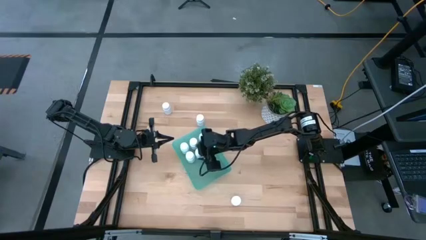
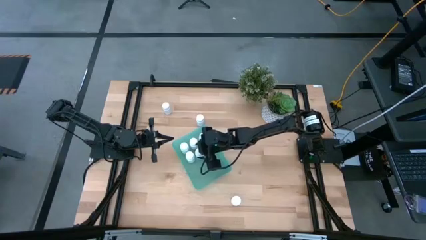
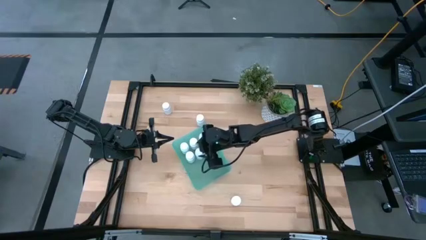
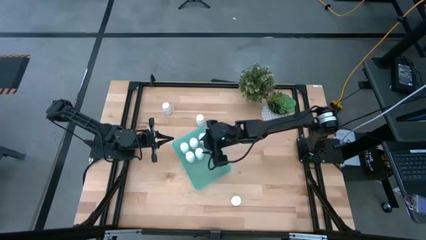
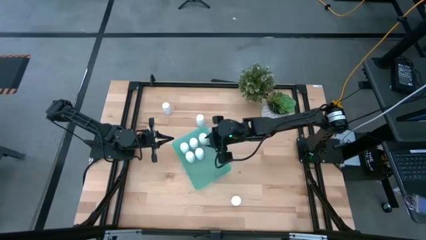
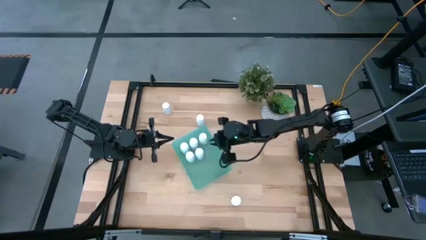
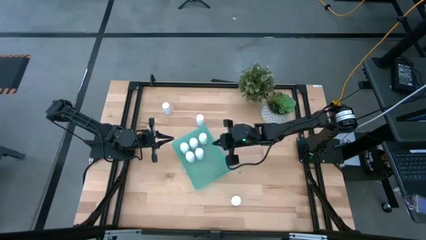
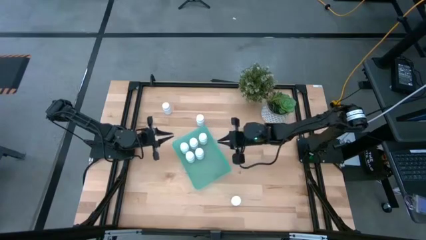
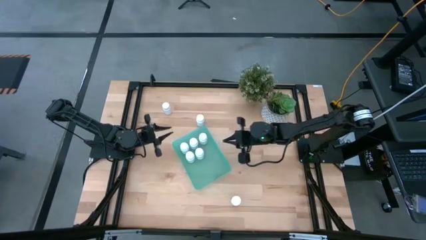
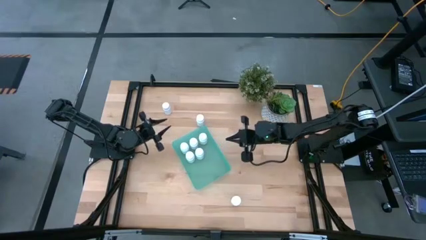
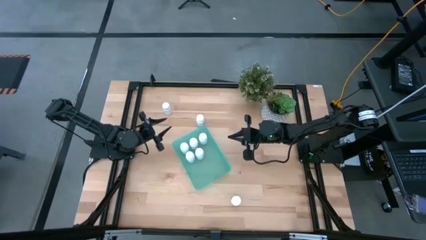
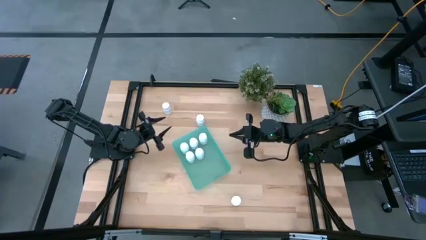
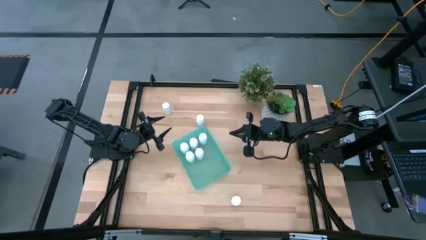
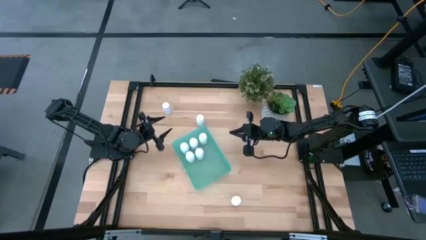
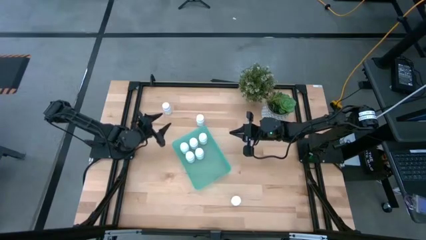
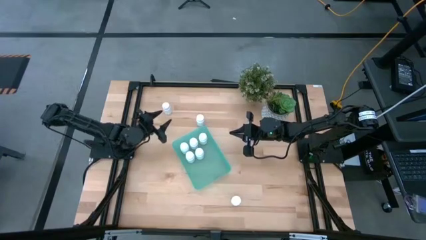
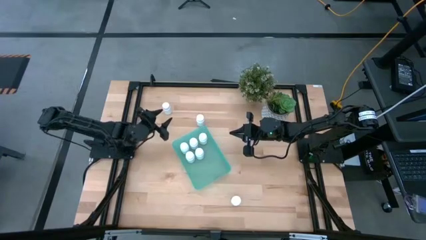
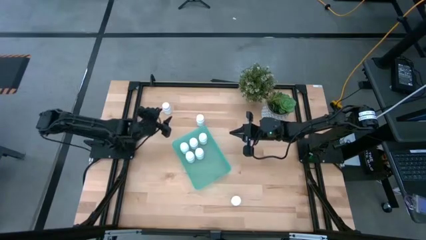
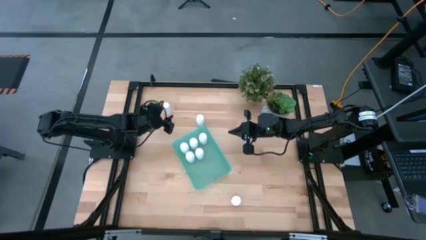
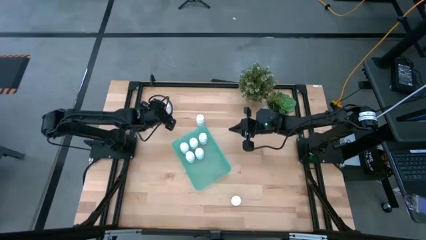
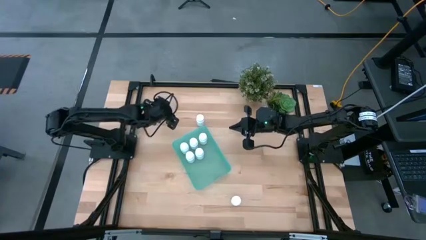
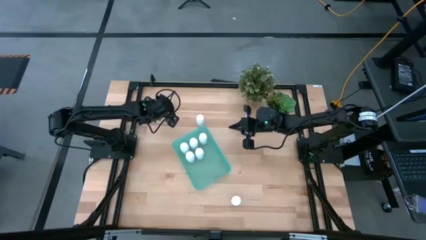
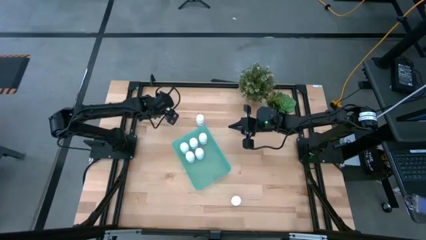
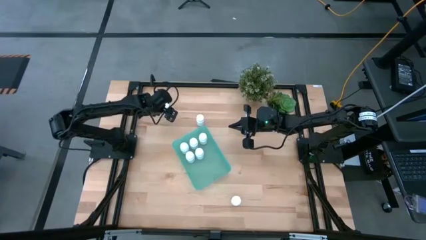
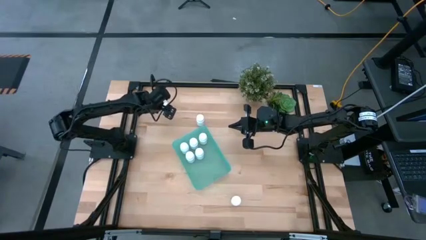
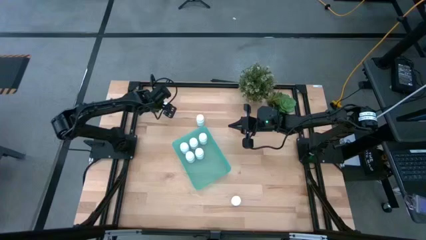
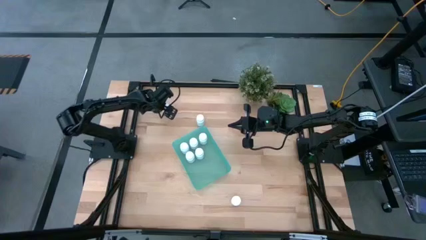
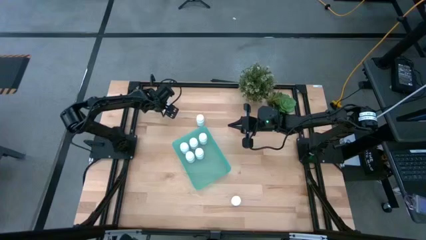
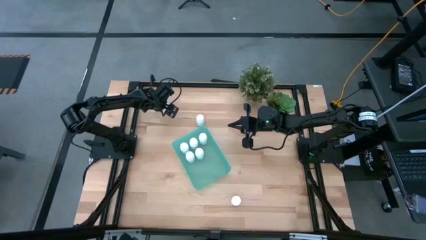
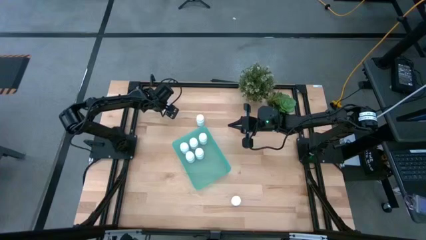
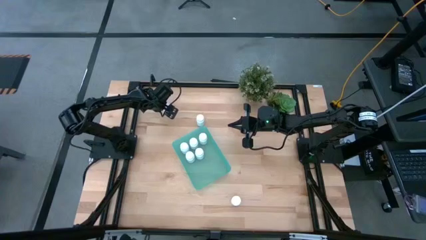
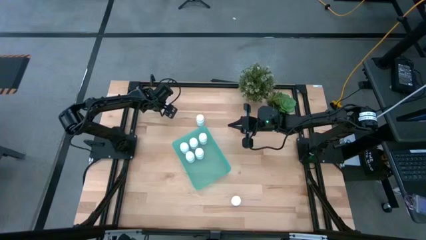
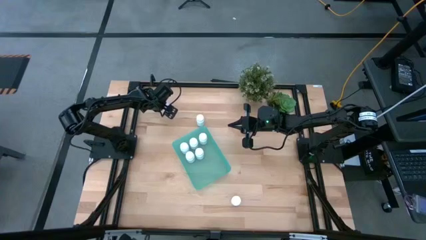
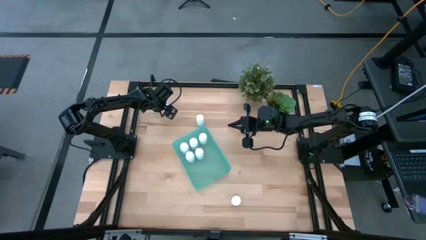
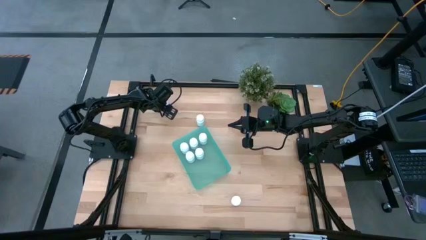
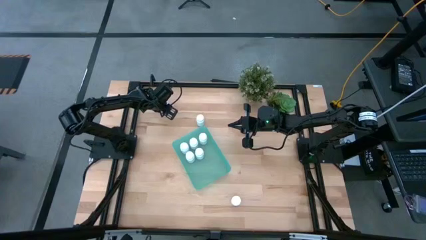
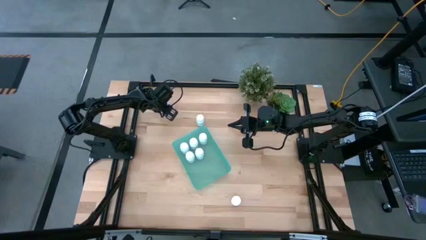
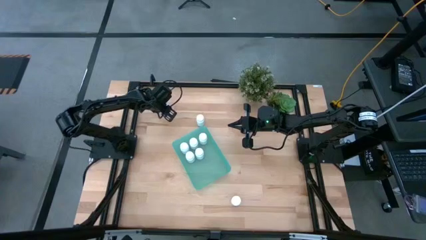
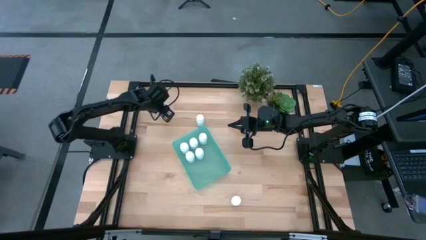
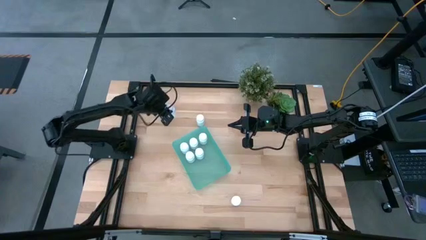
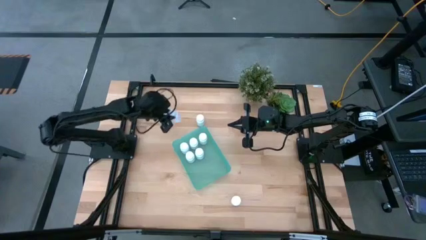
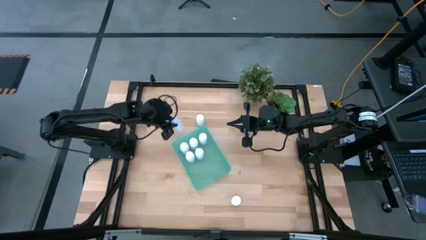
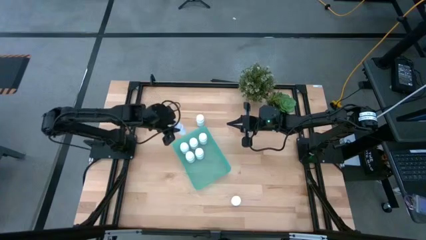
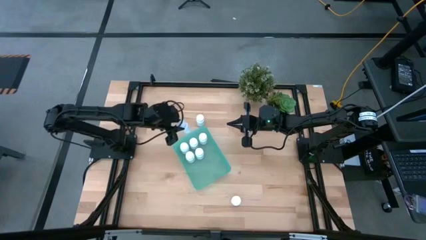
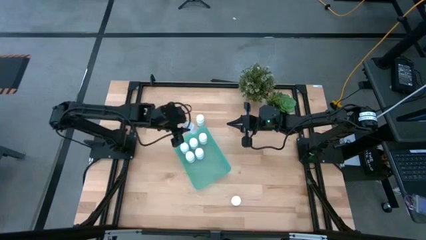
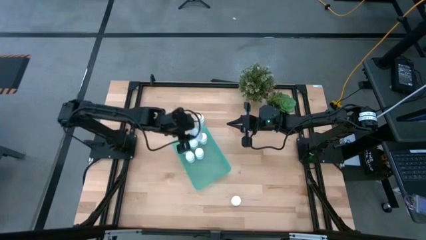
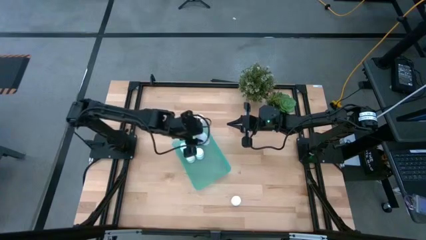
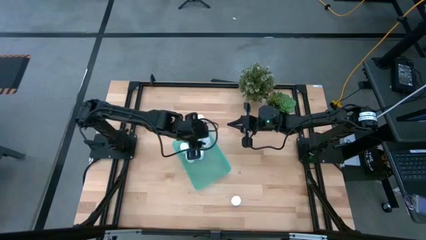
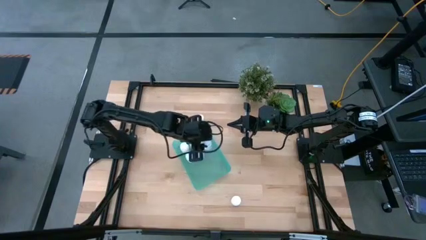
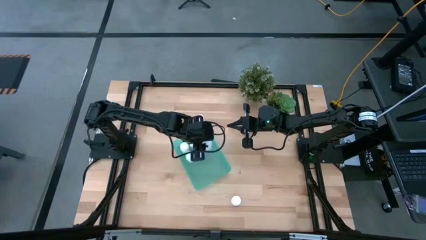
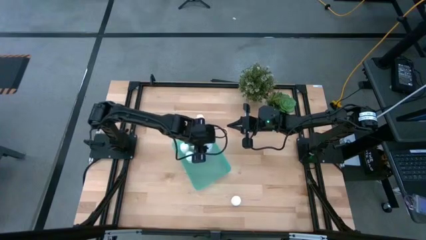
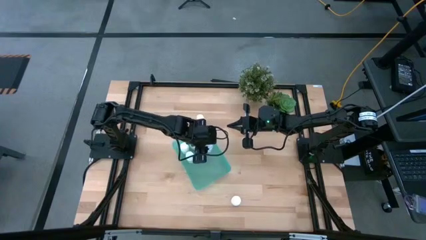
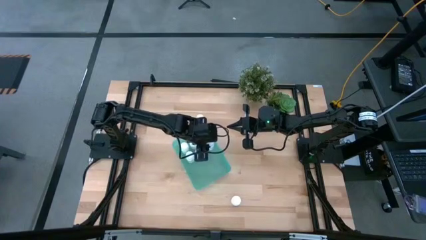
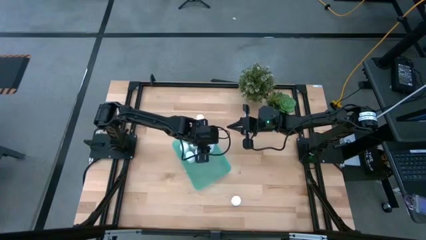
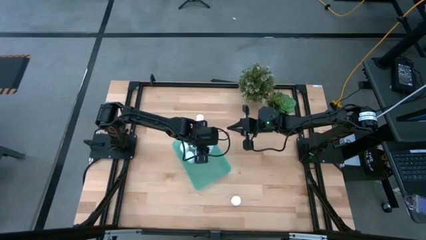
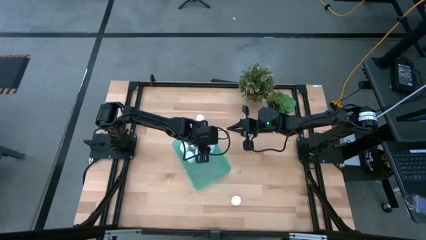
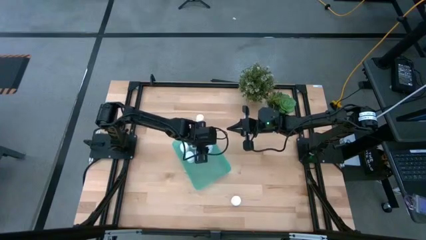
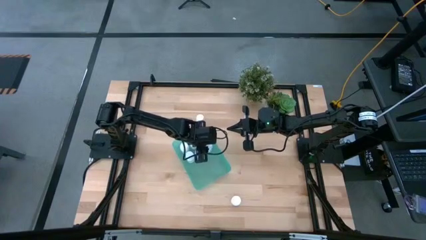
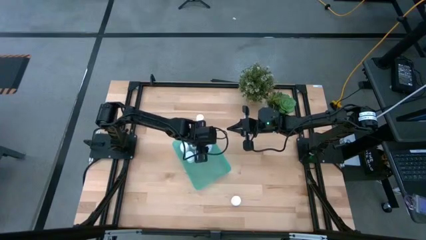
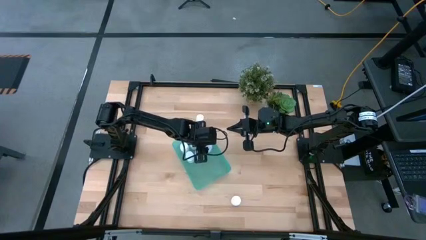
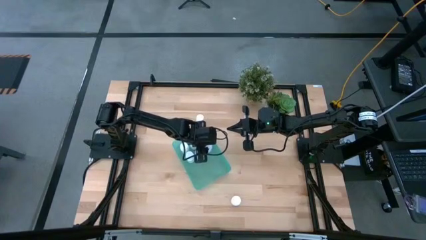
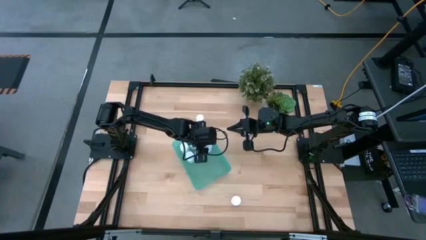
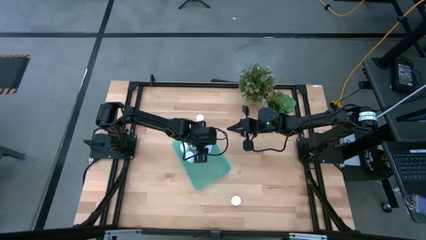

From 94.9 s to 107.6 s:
Task: Pick and place pill bottles into a basket
Put the white medicine bottle into the green bin

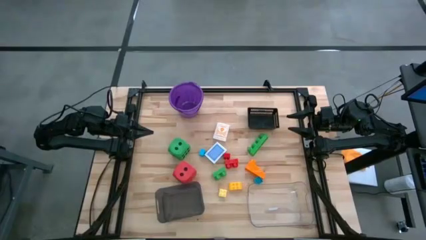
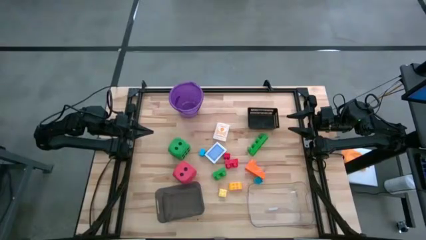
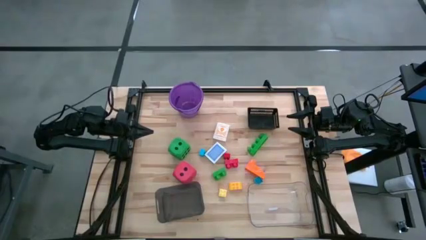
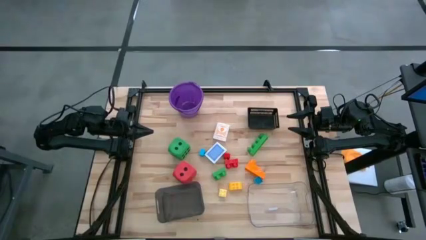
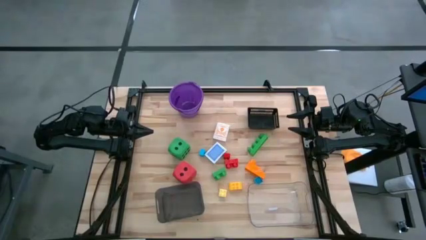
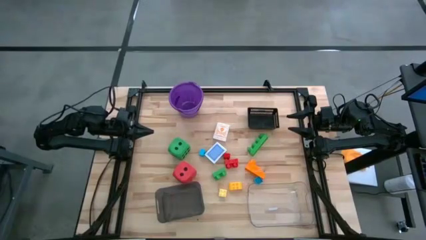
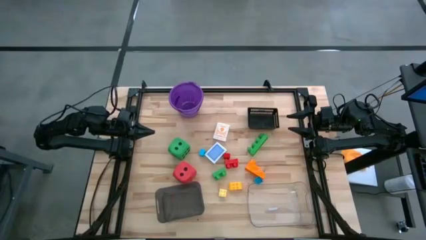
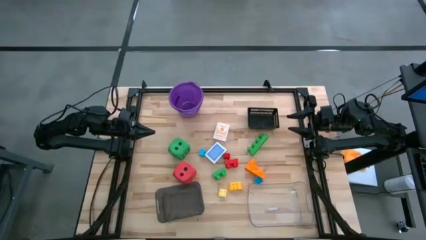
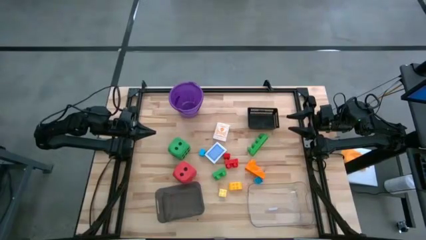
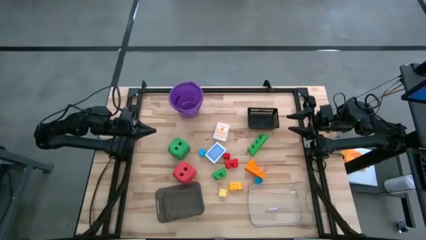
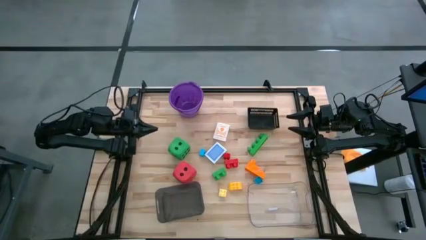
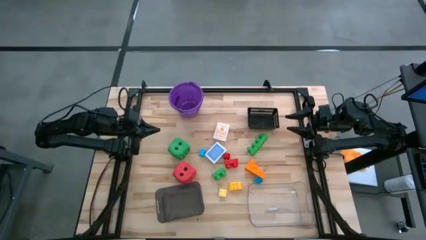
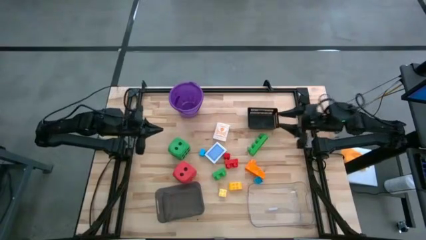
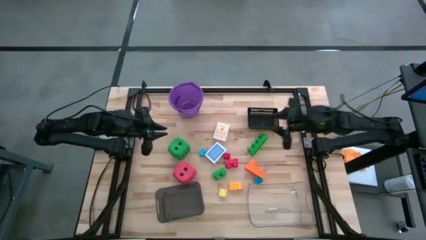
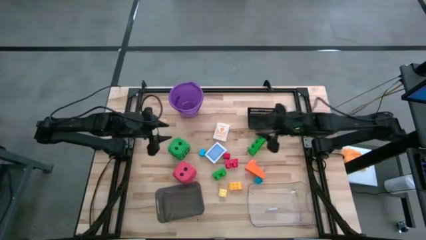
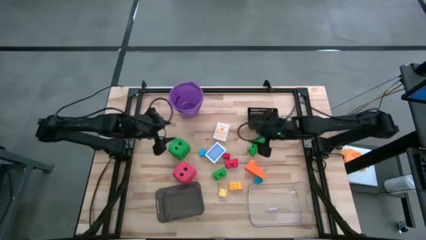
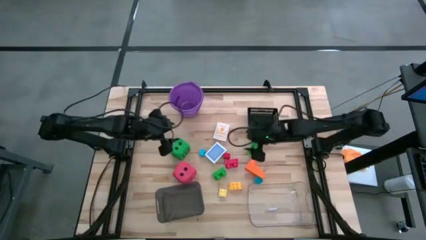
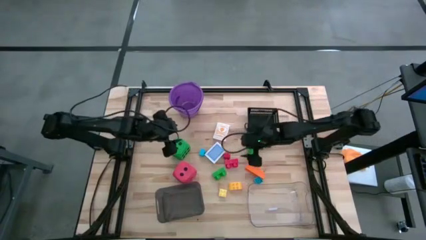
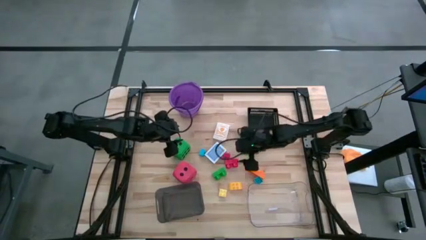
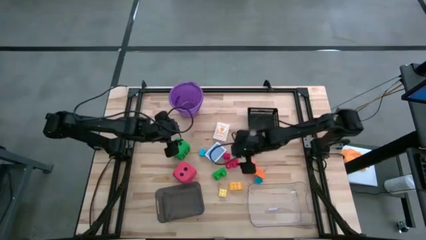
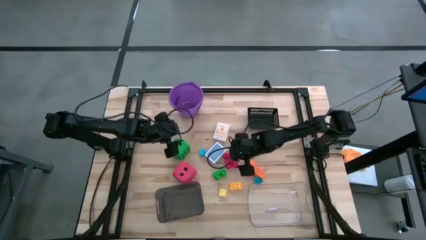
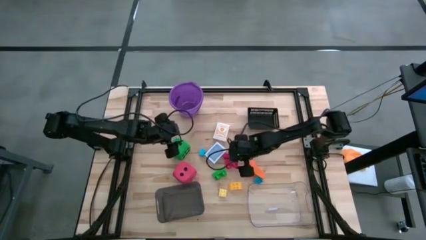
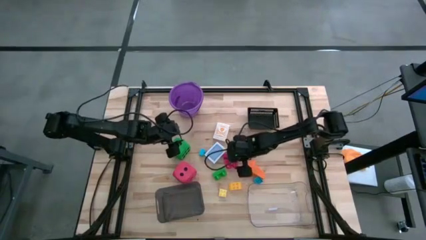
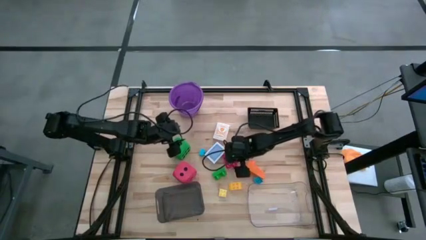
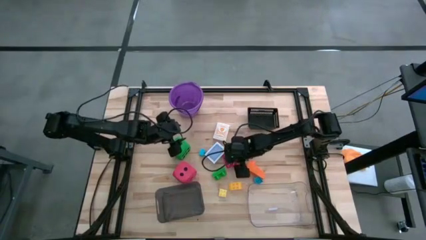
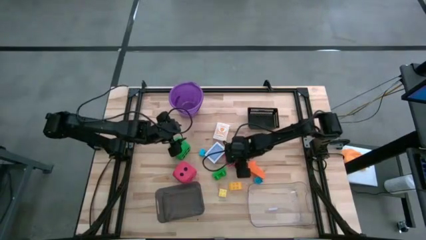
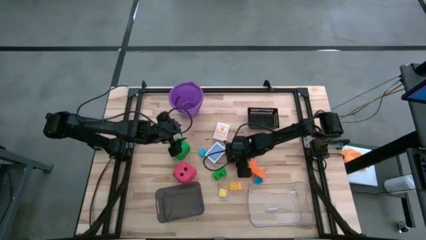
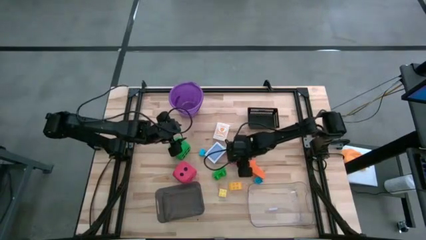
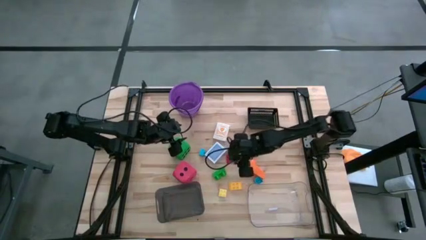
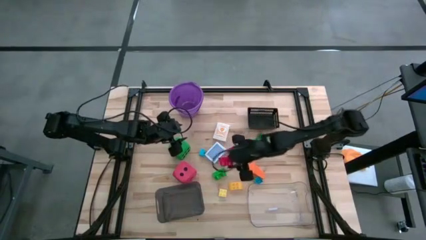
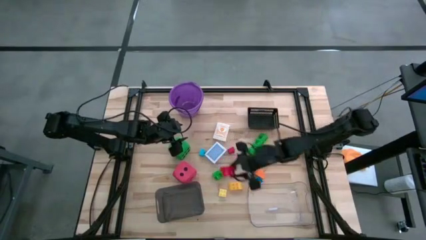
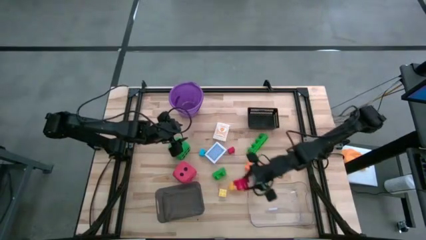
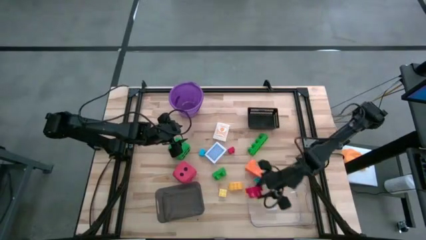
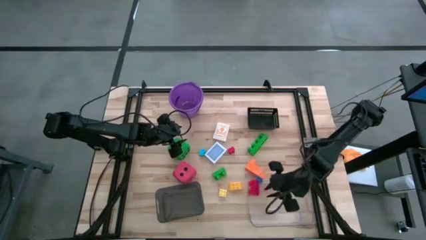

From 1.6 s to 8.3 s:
Task: Pick & Place Toys
Put the large red game piece into the transparent bin
